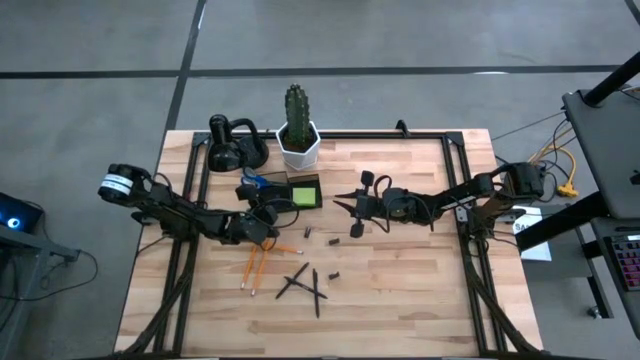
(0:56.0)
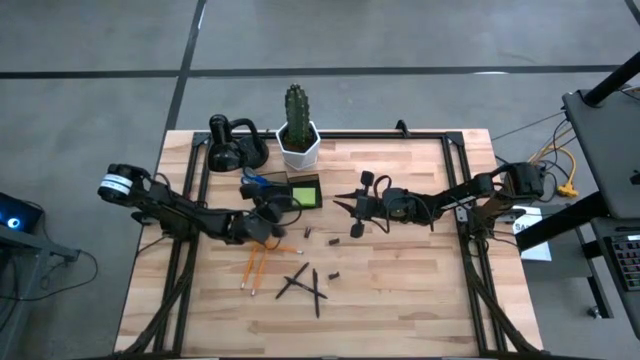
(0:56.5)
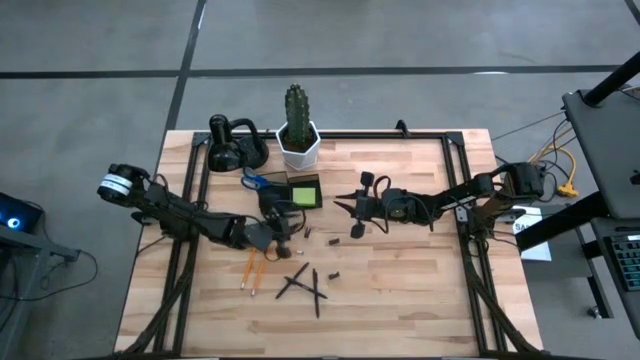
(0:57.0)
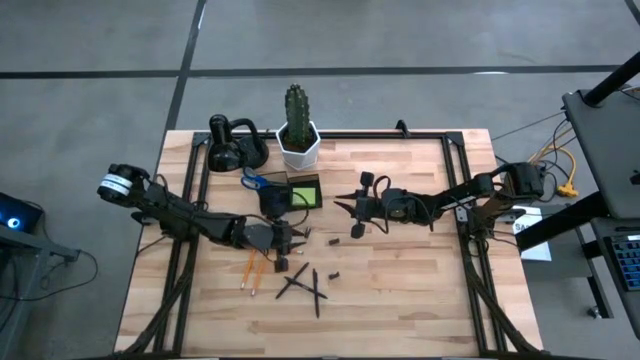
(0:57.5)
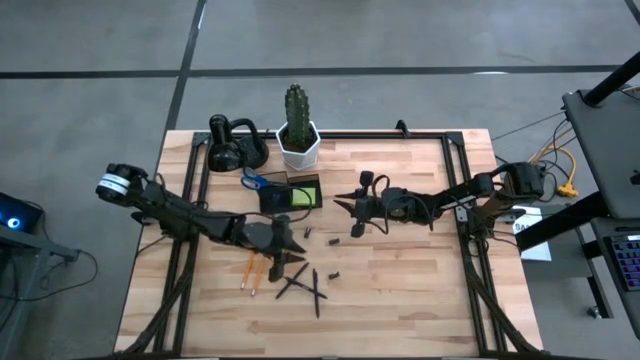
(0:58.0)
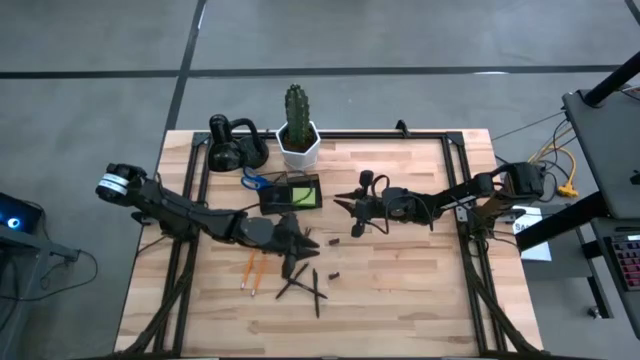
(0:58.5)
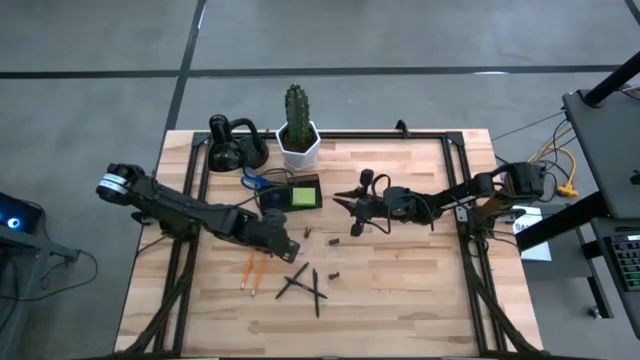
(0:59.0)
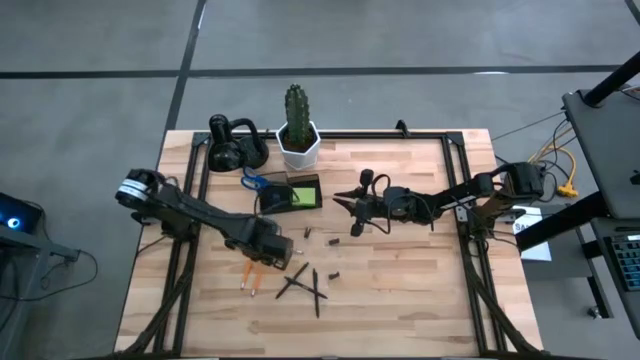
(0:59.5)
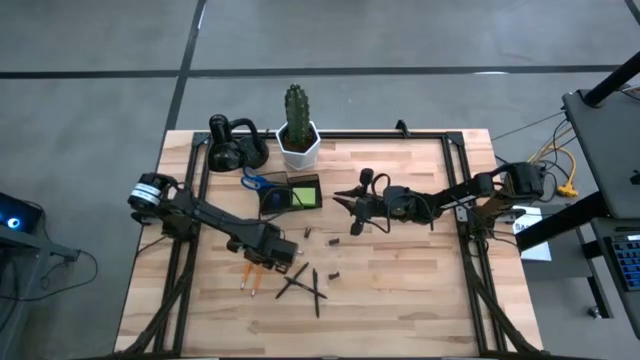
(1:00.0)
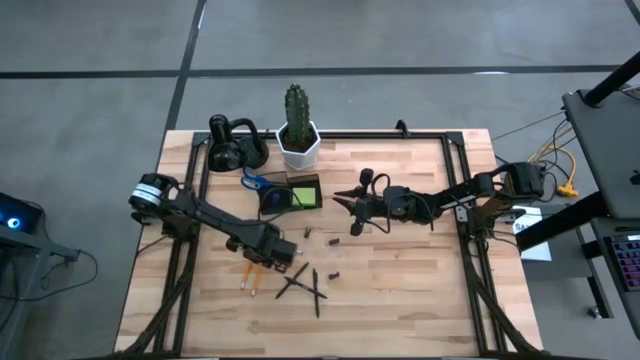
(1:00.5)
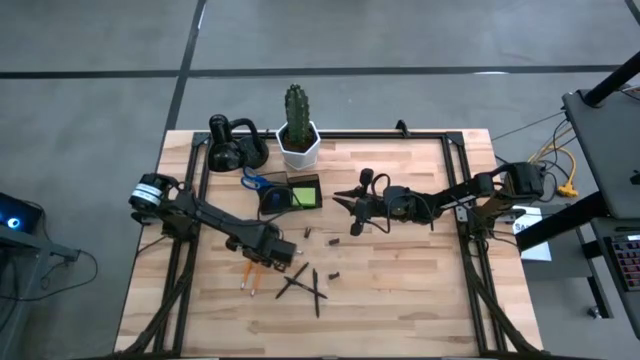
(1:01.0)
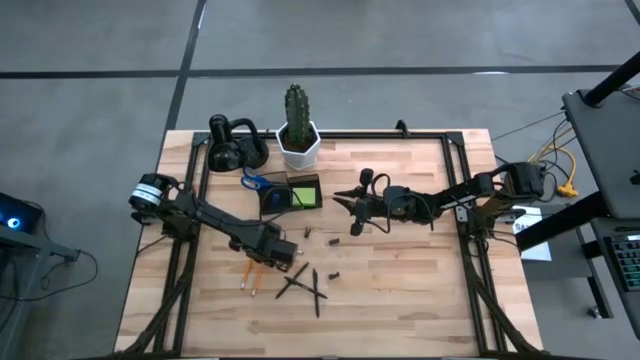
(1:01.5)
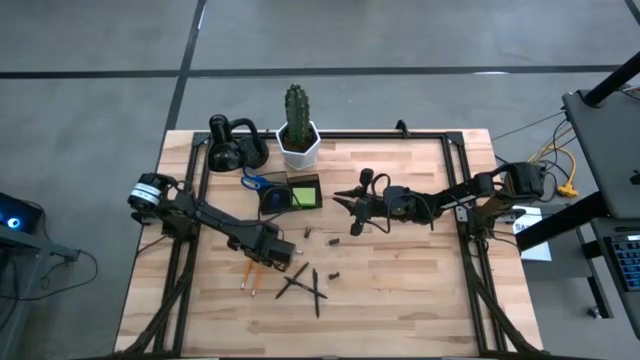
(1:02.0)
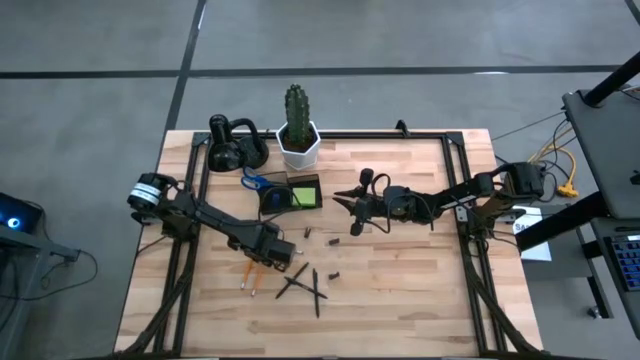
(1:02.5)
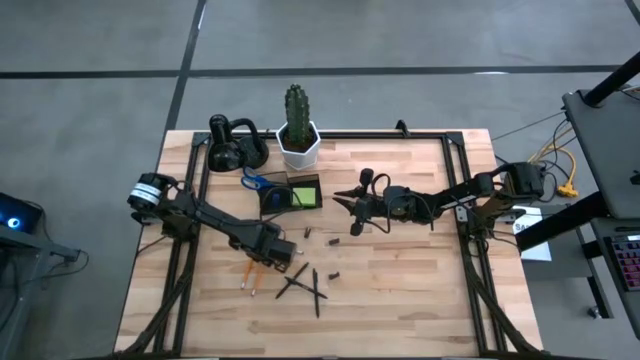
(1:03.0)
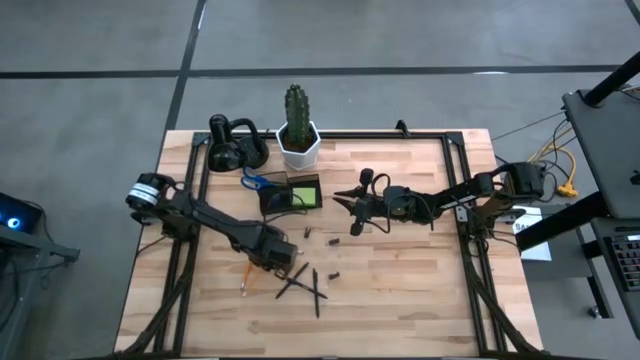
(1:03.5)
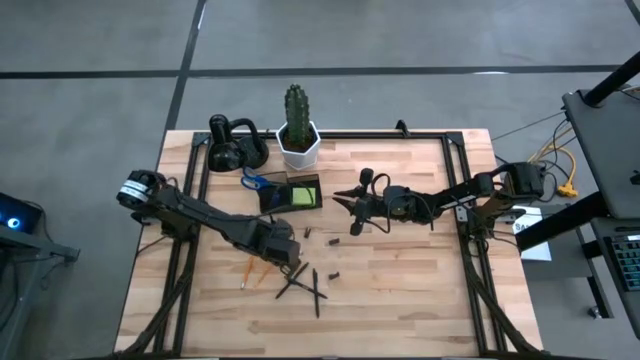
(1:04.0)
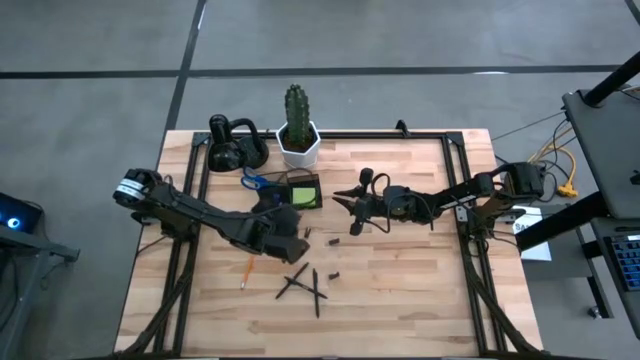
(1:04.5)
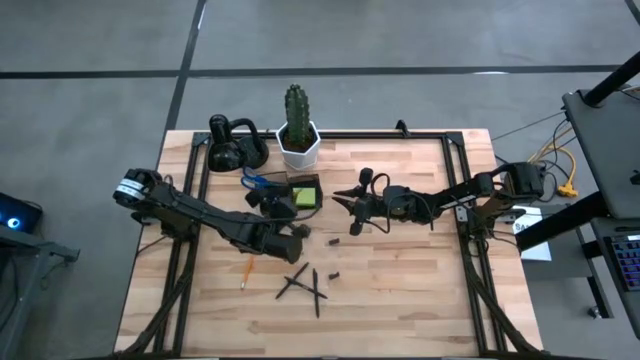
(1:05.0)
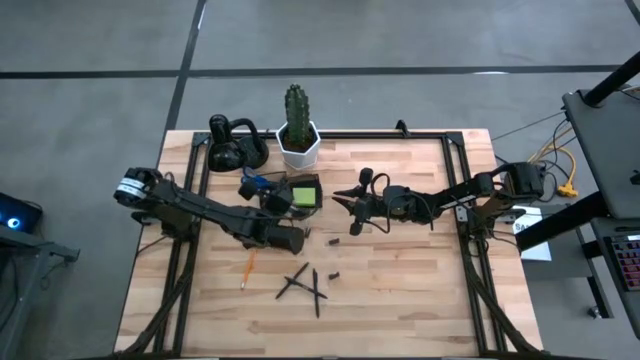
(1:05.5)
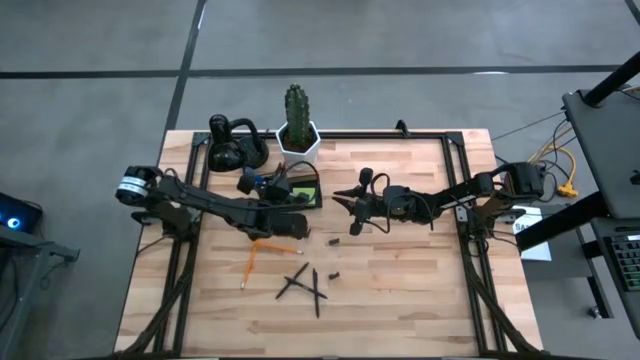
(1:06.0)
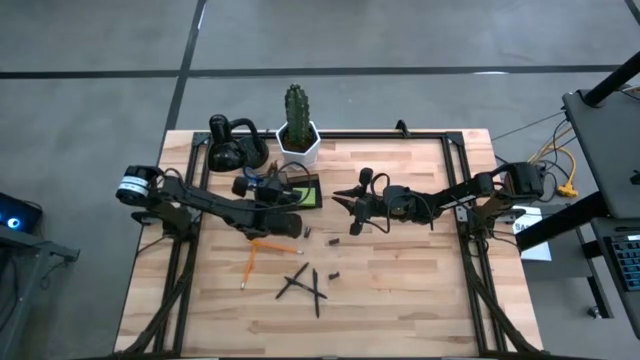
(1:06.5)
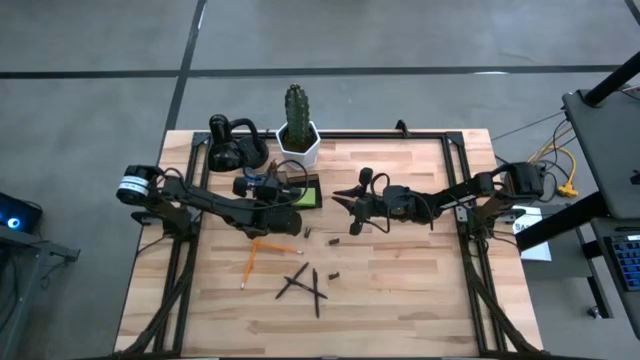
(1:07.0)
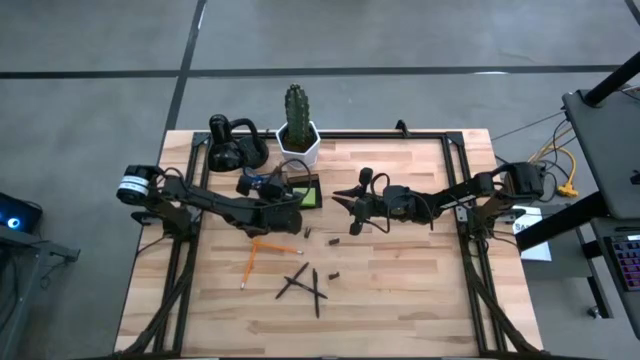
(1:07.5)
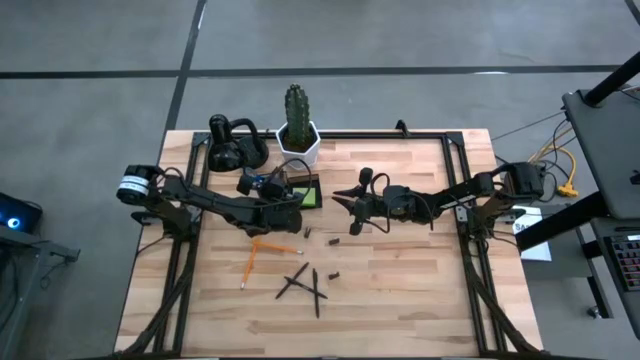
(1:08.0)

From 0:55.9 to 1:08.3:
Task: Pick and place office supplies into organizer
Put the bottom left orange pencil into the black desk organizer

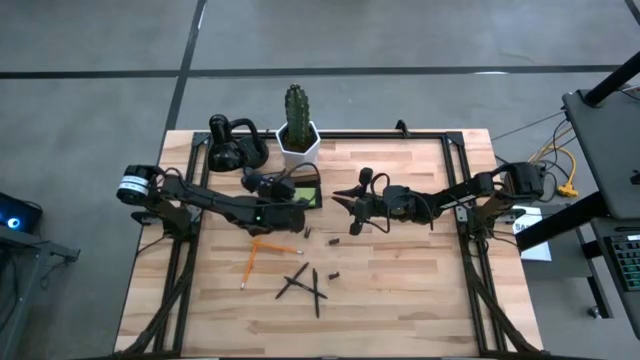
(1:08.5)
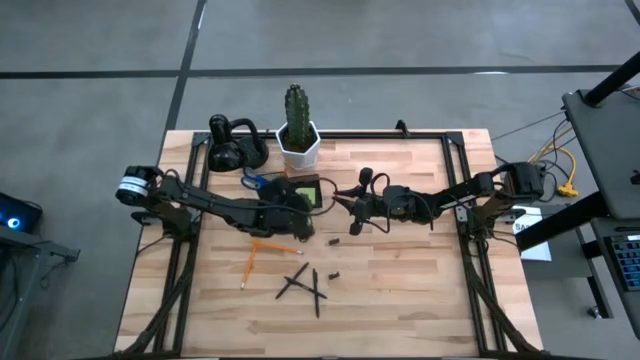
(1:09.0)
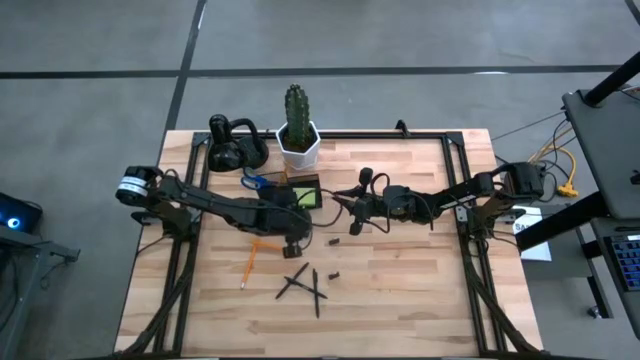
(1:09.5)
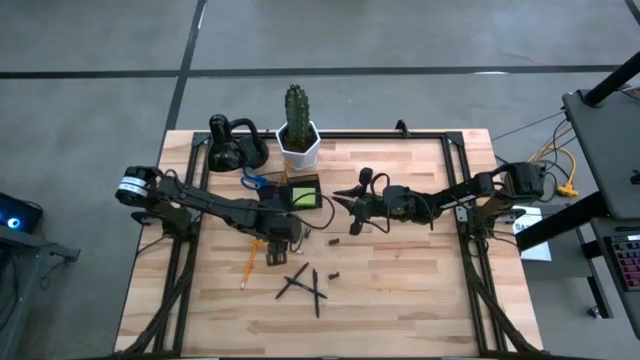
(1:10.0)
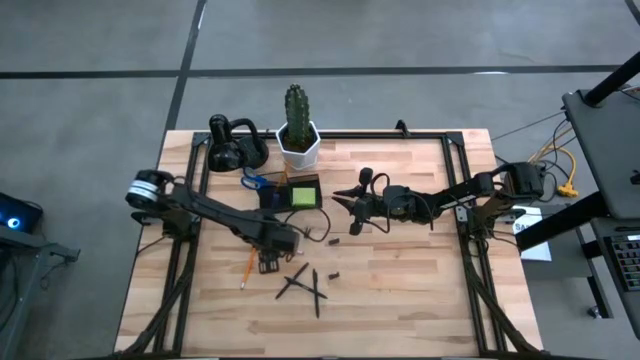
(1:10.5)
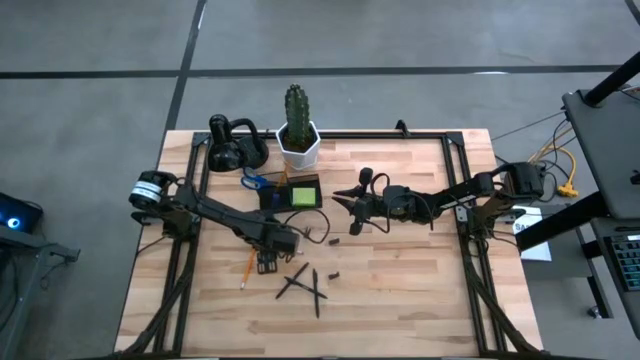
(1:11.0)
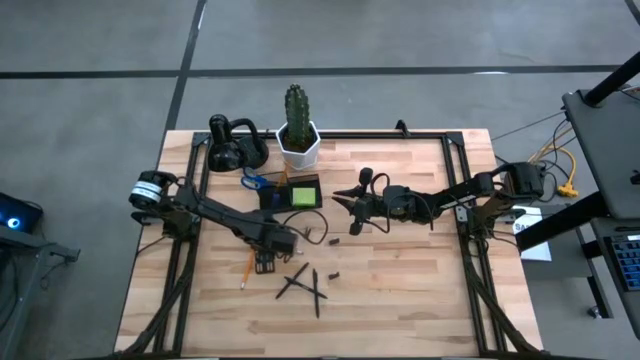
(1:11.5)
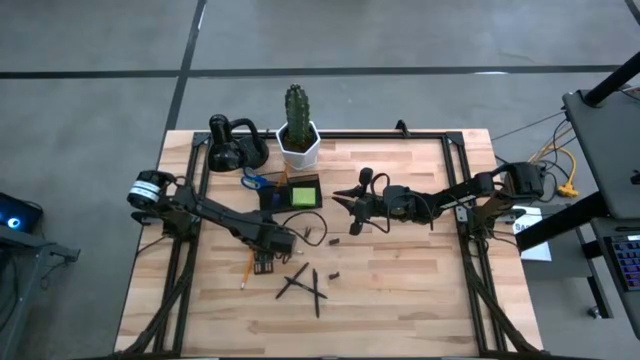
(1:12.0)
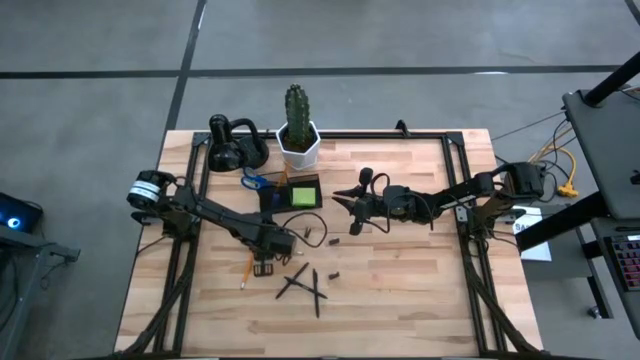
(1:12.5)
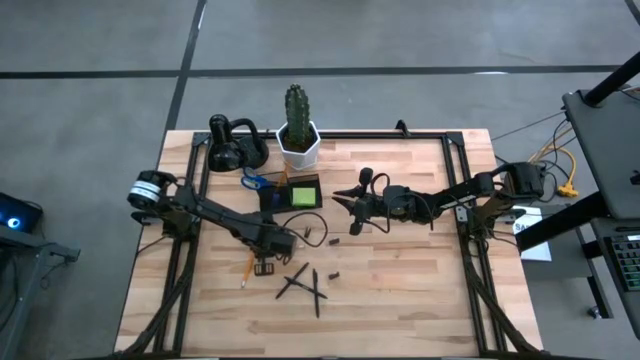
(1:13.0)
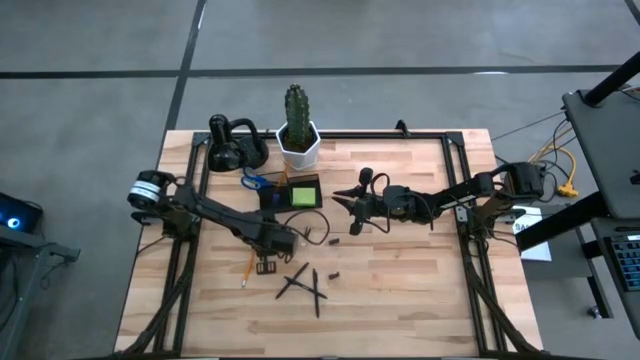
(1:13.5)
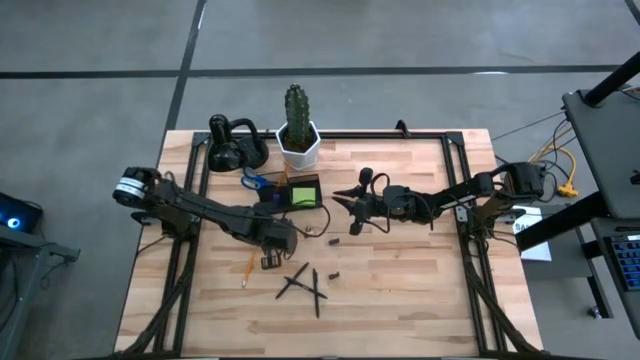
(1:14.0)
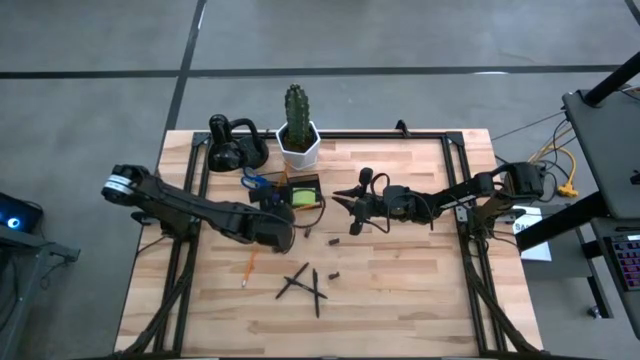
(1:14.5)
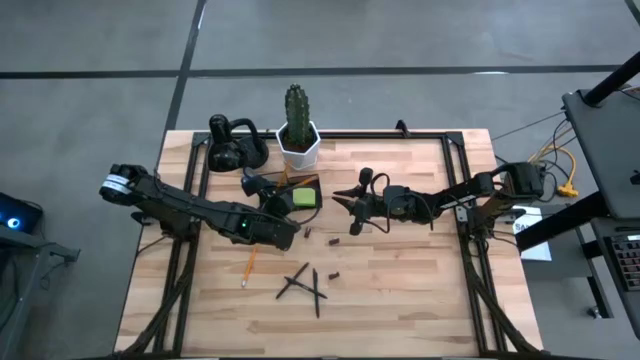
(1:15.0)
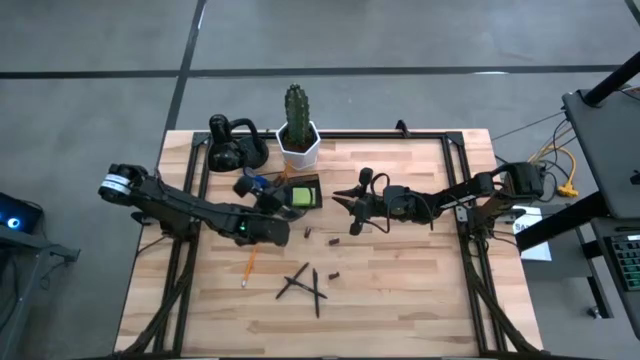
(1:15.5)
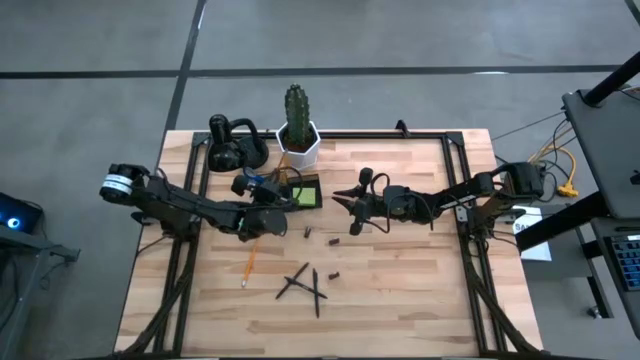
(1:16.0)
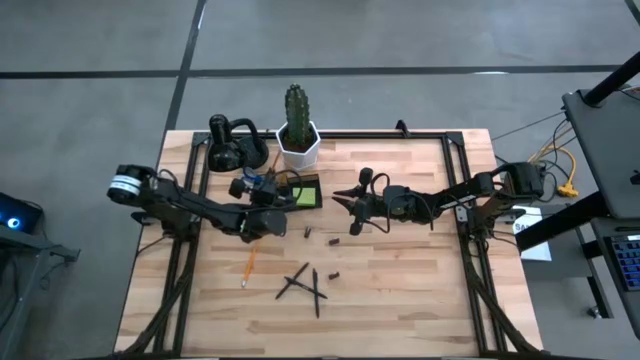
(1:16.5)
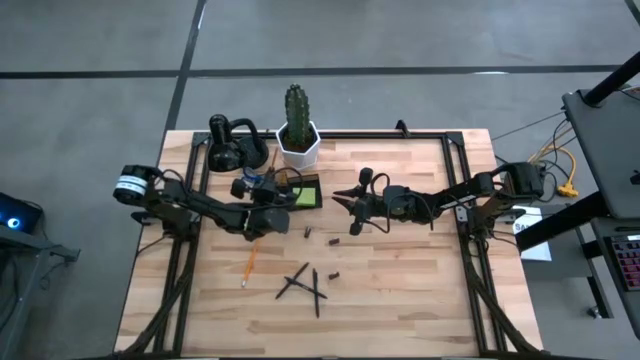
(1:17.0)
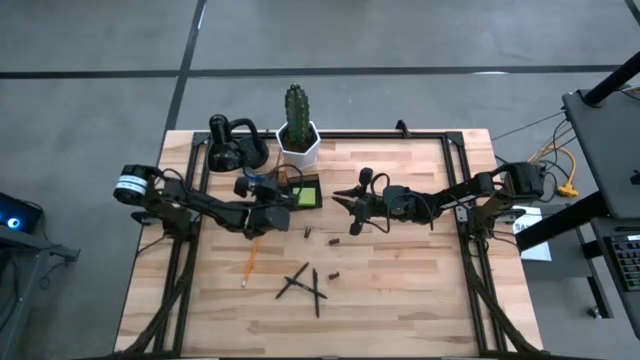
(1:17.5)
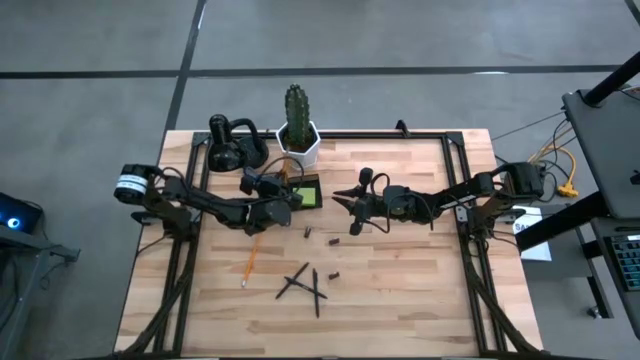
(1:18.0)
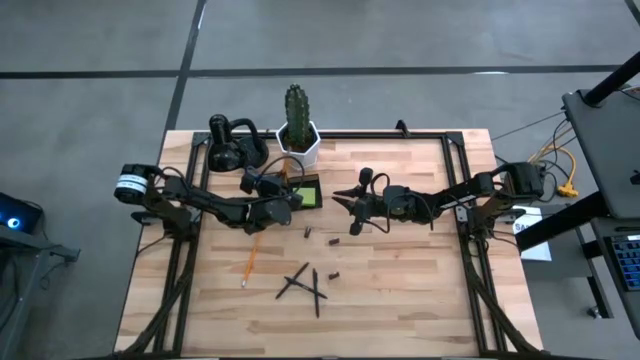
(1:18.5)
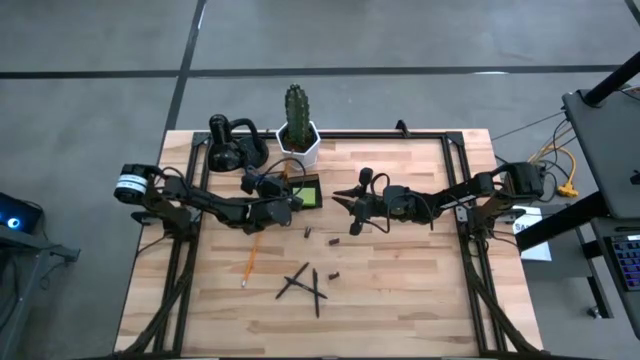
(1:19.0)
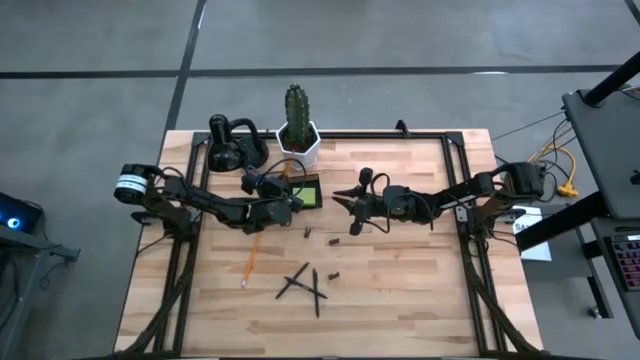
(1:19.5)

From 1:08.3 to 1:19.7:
Put the right orange pencil into the black desk organizer
